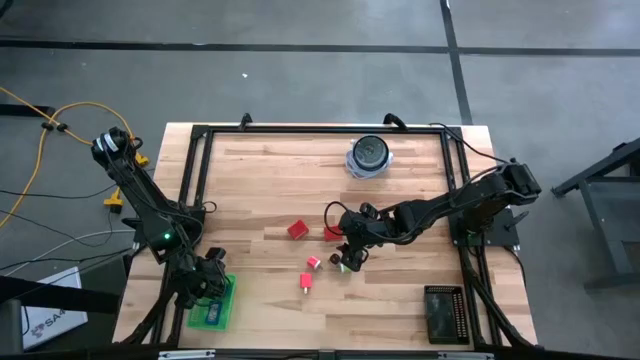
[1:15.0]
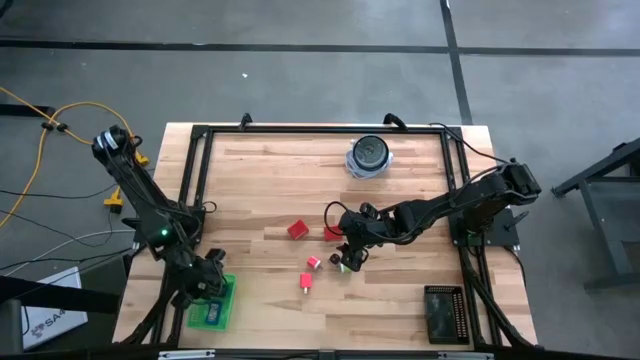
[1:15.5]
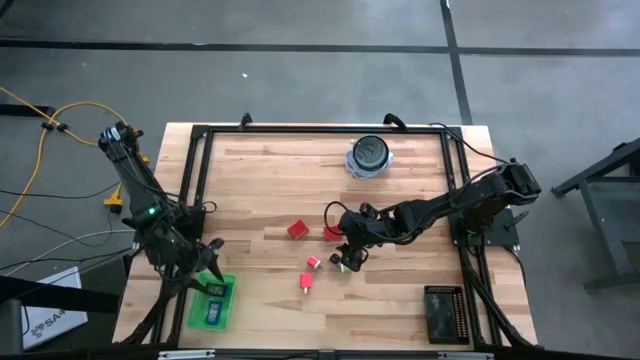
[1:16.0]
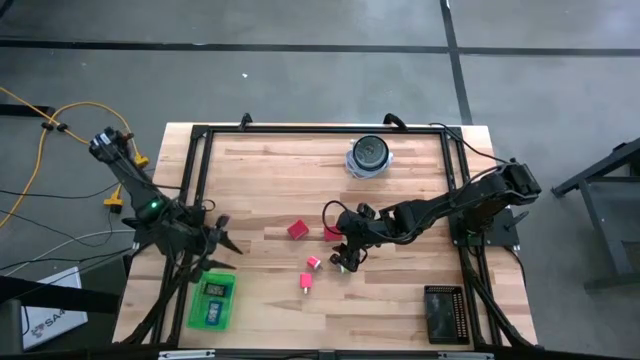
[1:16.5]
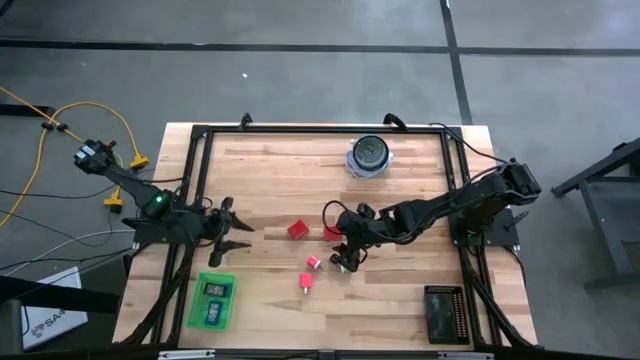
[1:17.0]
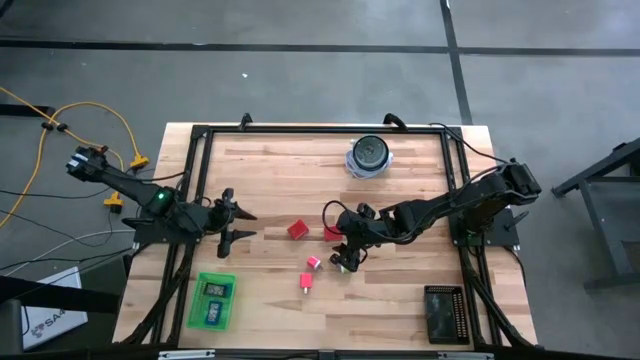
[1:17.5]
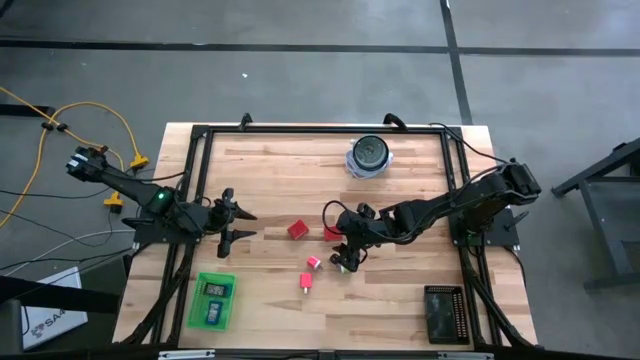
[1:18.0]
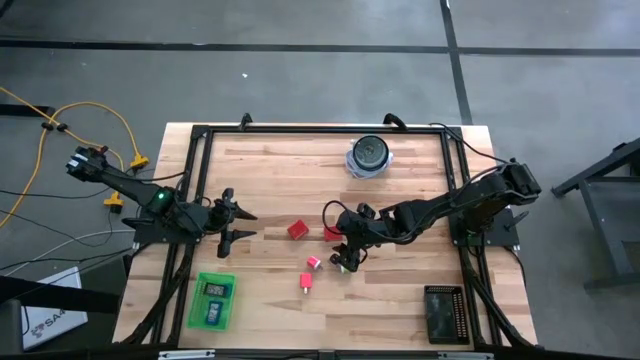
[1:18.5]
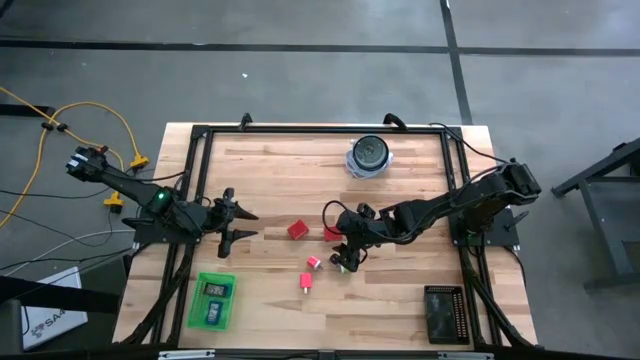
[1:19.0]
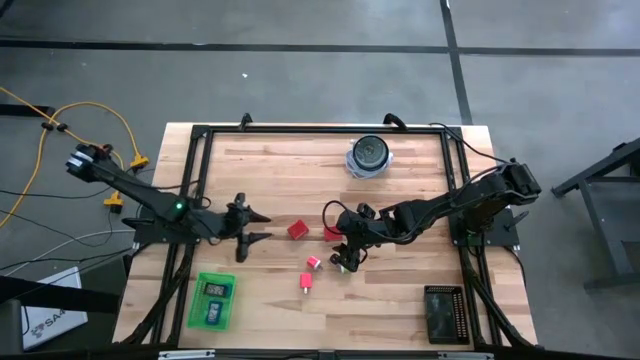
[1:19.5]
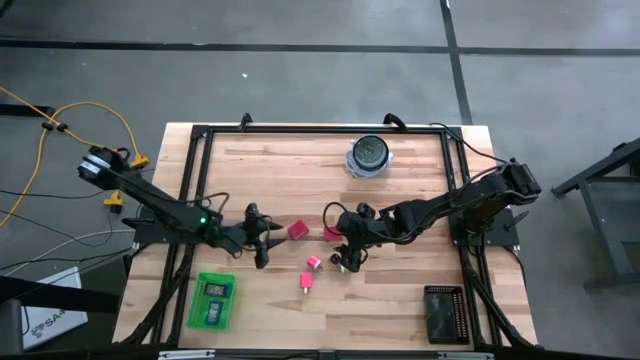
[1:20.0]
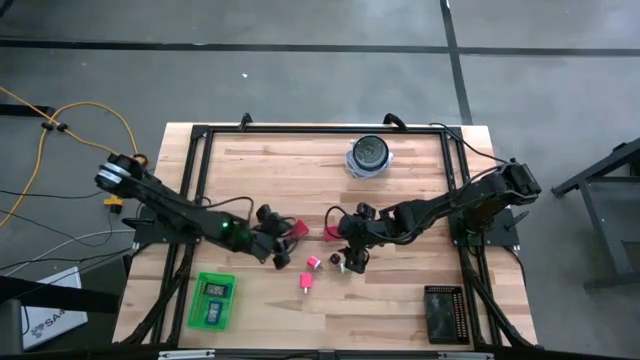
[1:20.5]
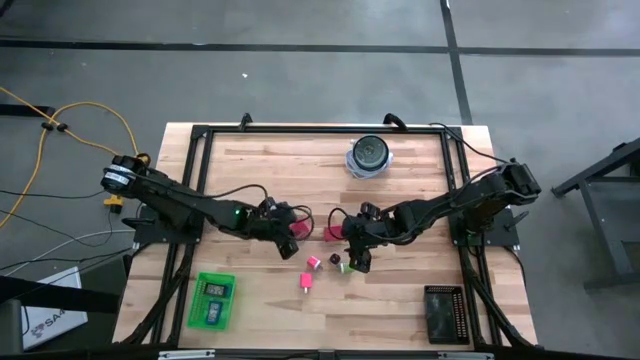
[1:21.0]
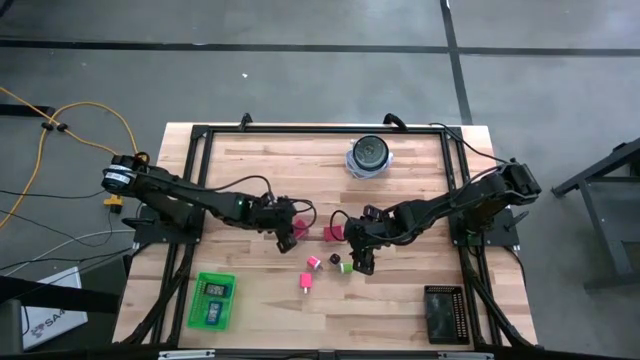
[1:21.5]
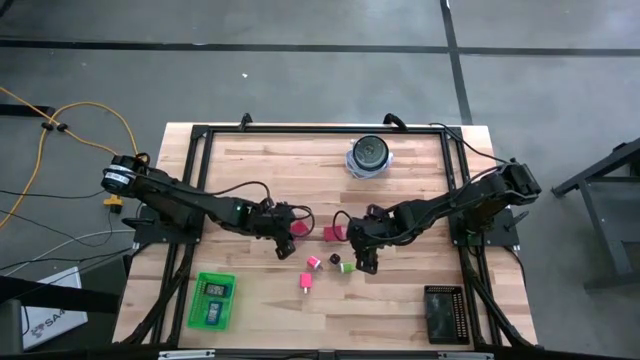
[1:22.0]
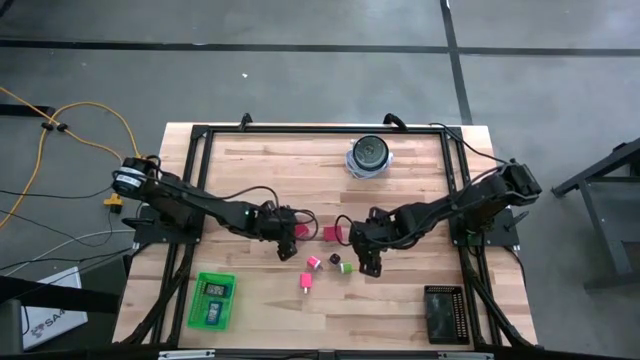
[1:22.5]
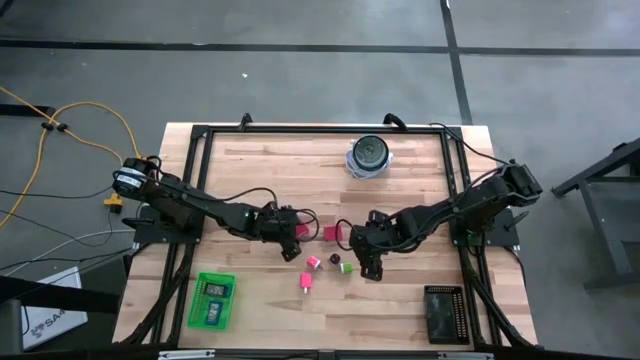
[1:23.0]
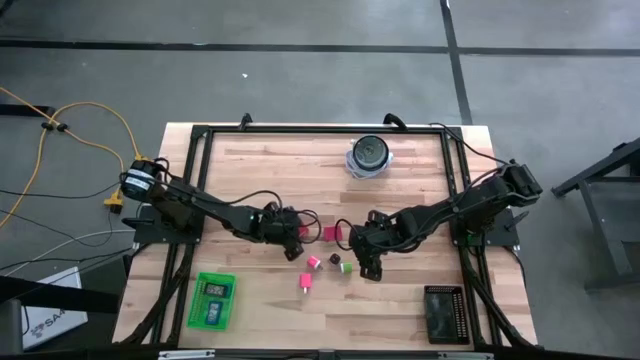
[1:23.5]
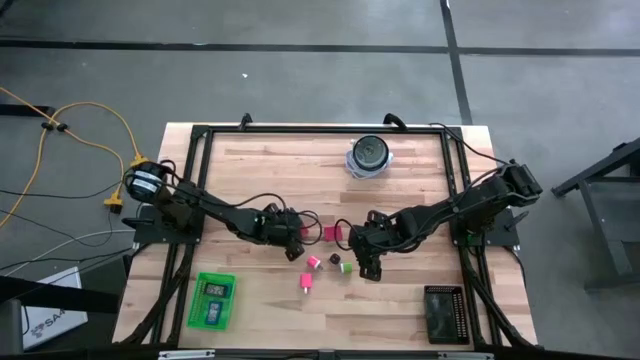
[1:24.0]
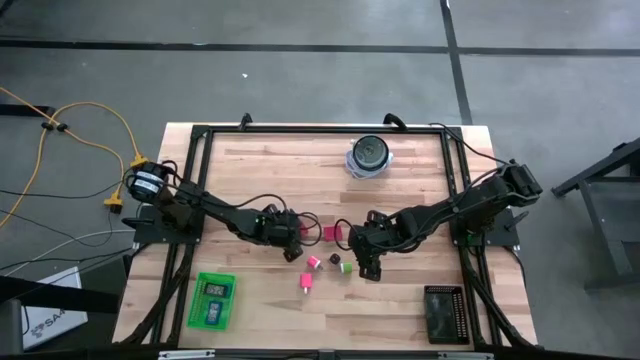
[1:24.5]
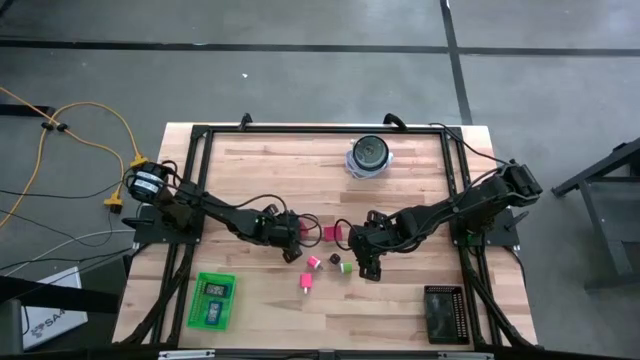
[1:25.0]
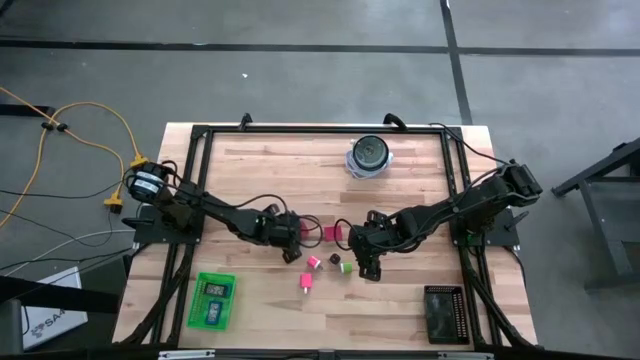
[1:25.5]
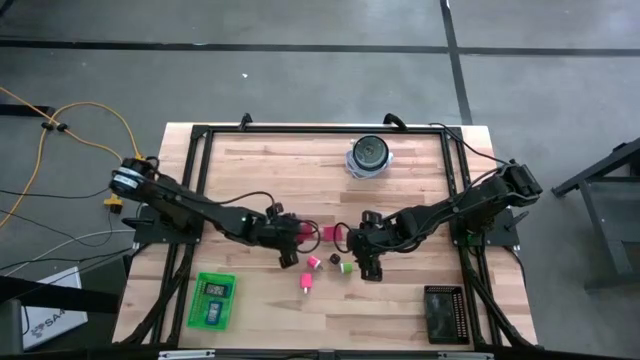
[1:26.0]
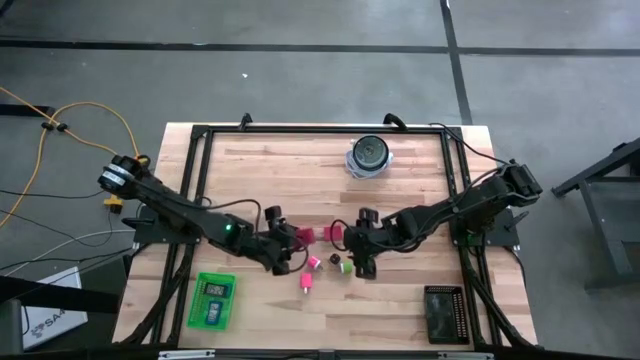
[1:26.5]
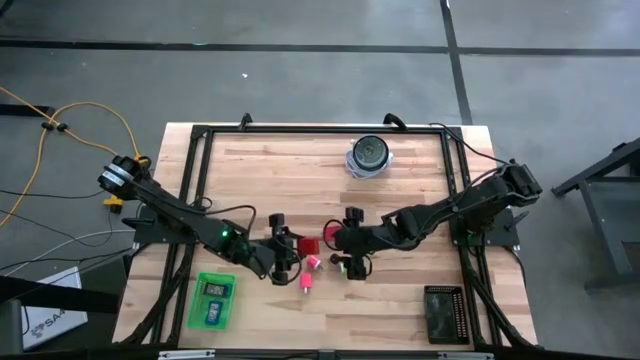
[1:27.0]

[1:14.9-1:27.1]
Task: Pick & Place Office items
Put the left red charger adapter into the black bin

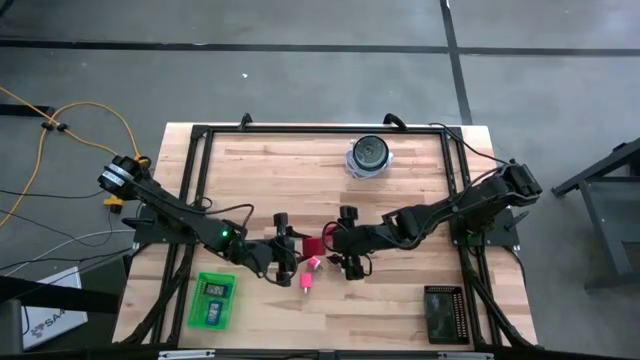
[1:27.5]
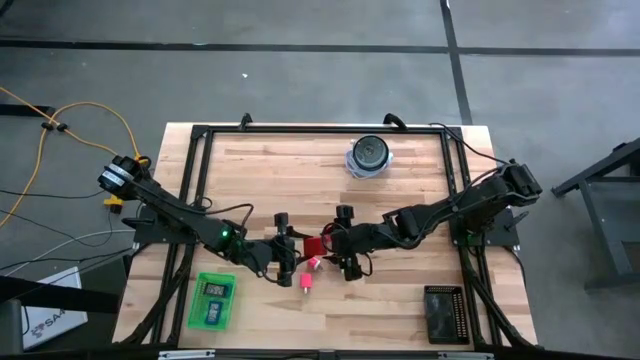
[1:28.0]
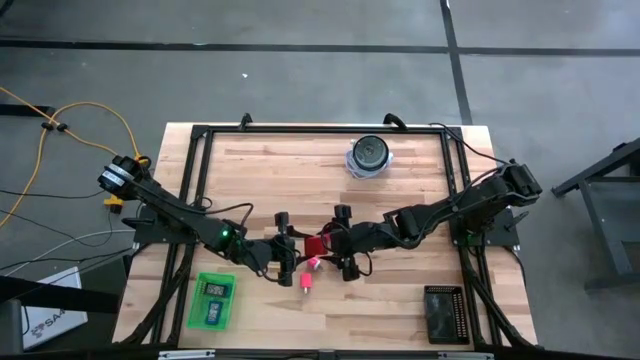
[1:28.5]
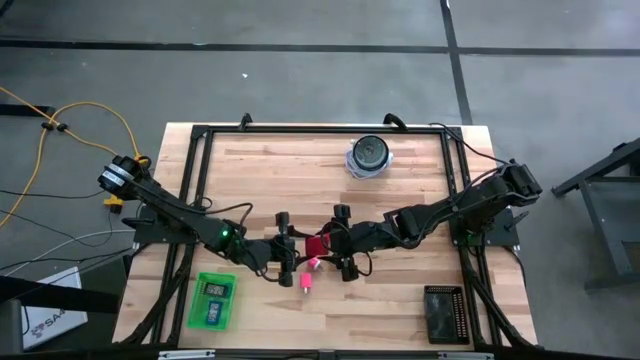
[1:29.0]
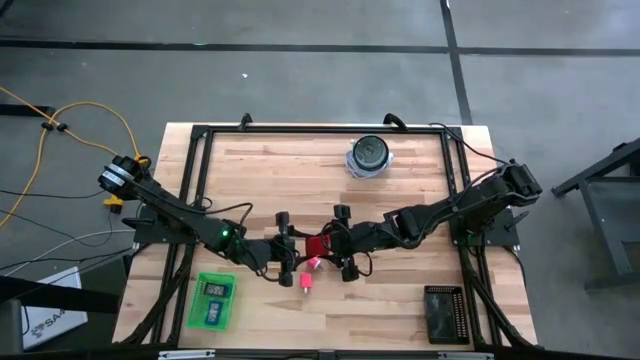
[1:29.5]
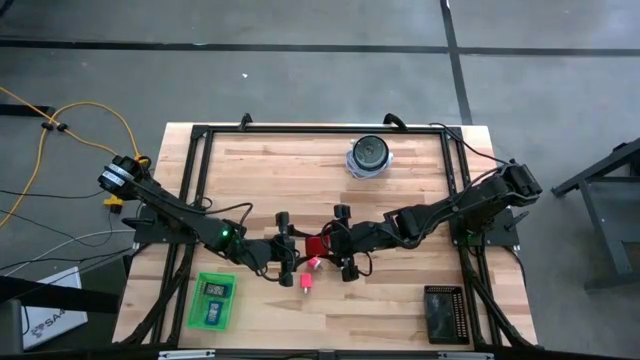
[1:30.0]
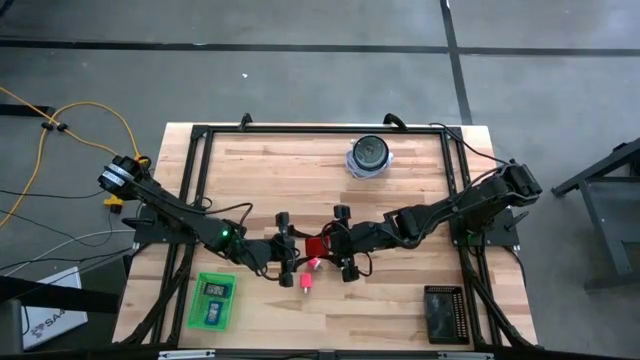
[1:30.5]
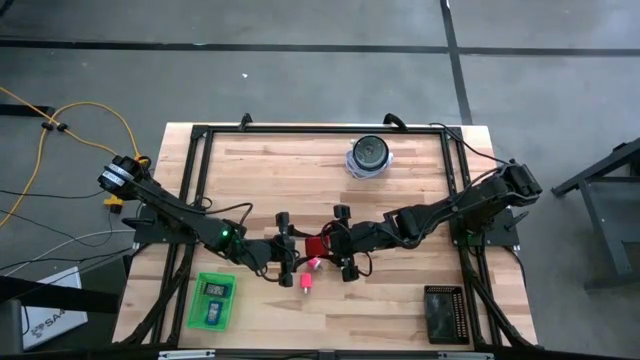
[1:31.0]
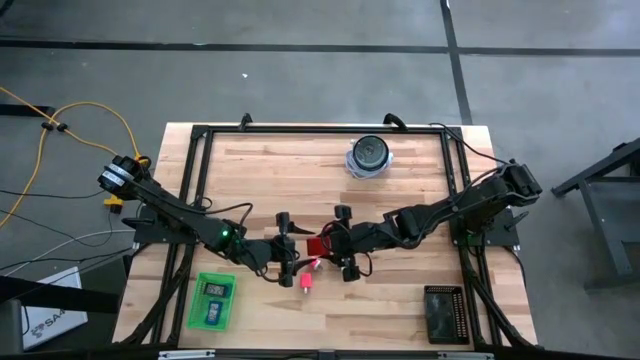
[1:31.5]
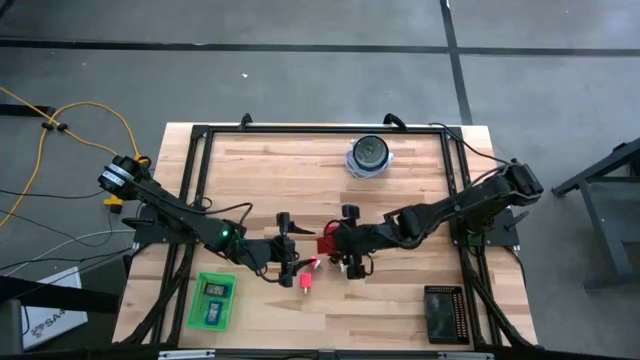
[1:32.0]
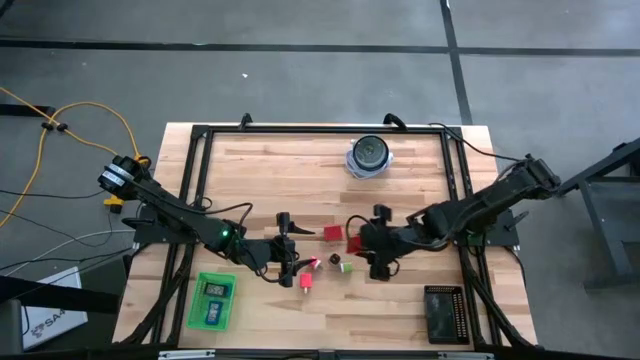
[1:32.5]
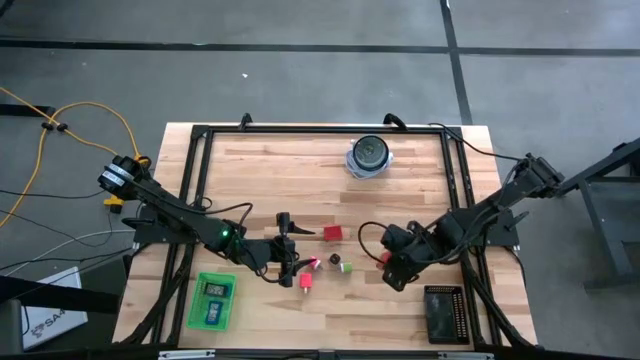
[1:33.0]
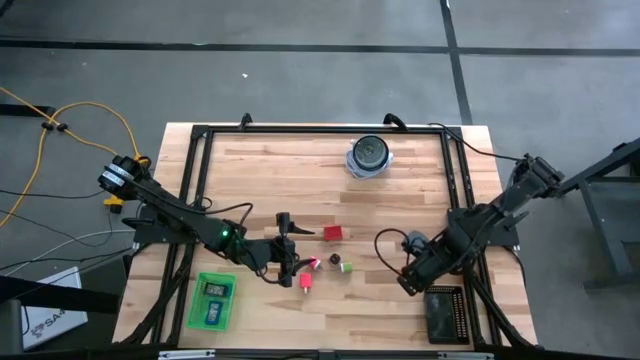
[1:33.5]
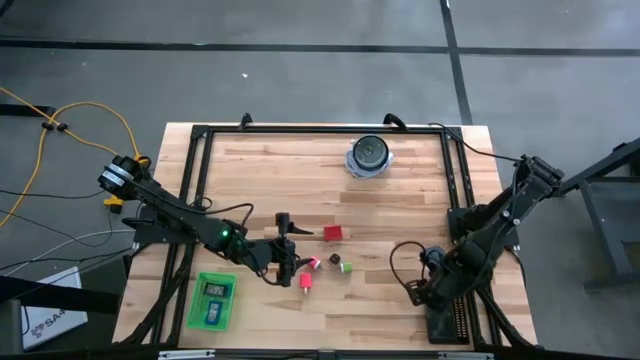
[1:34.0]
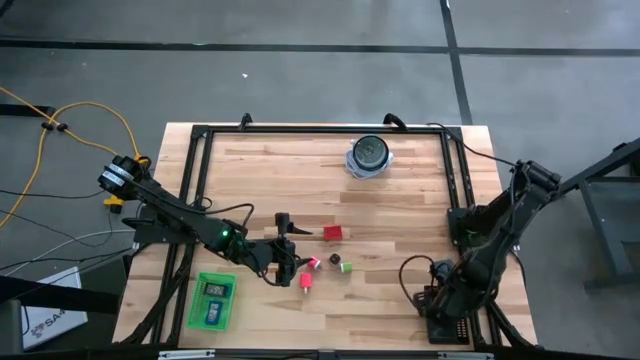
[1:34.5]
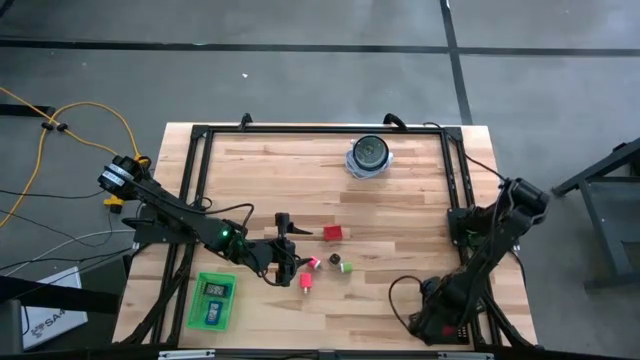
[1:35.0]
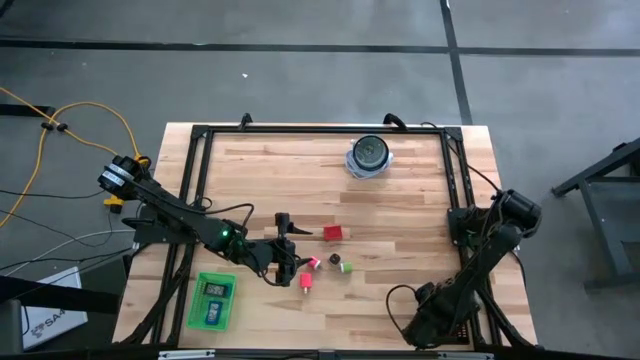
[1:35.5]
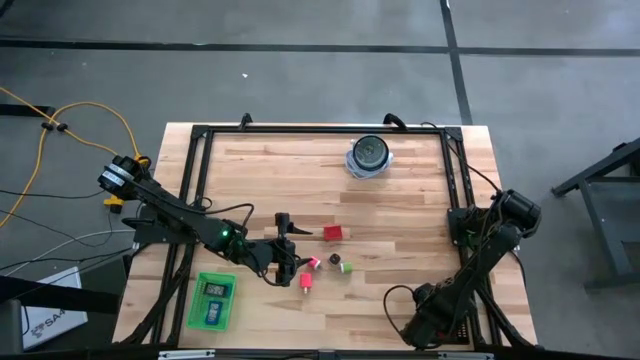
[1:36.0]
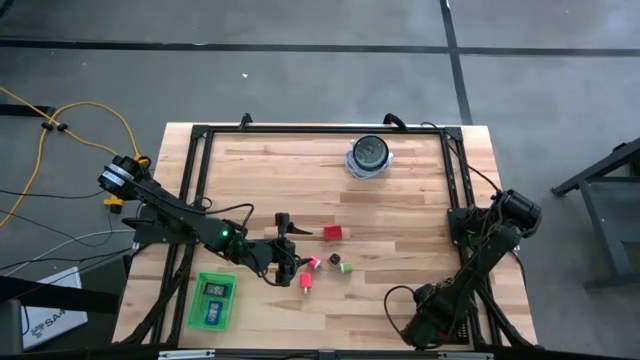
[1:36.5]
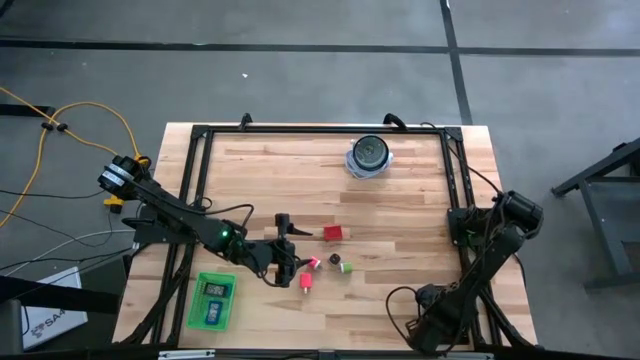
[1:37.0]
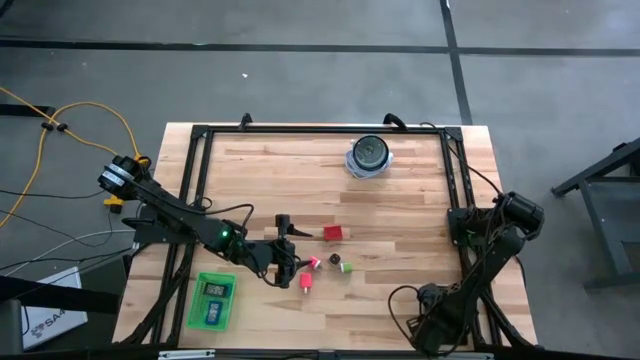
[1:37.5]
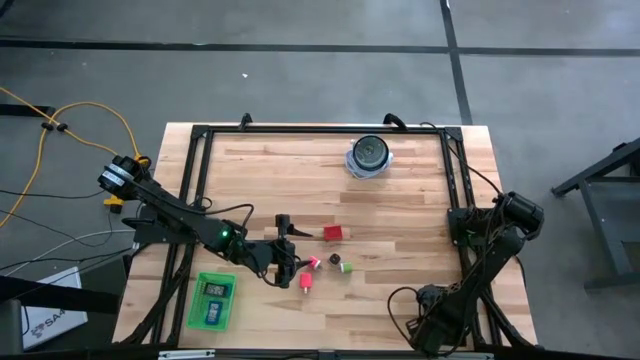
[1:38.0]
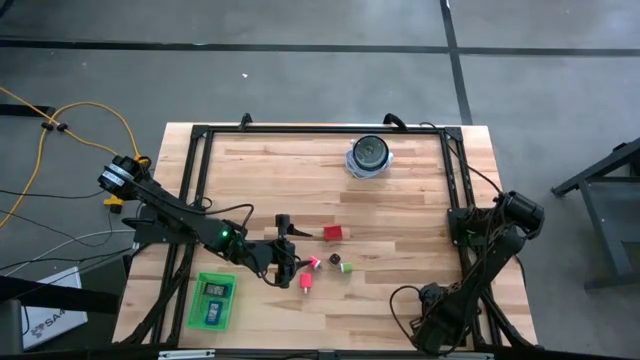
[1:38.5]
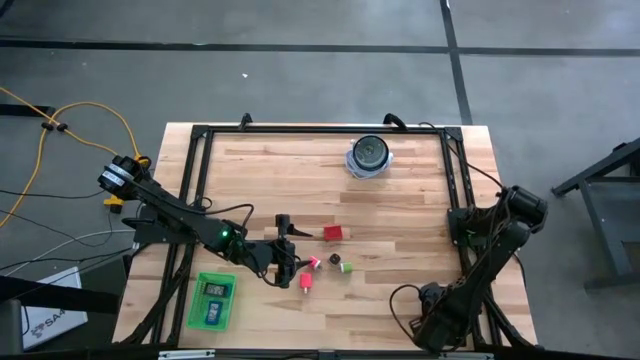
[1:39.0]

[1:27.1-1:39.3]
Put the left red charger adapter into the black bin
